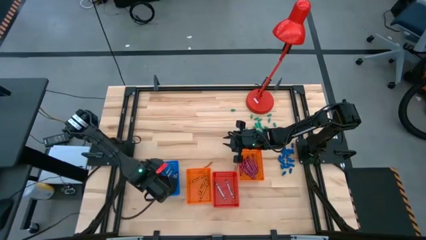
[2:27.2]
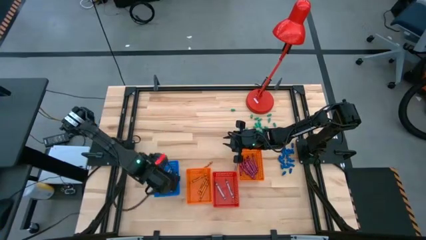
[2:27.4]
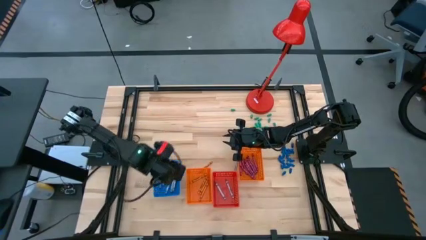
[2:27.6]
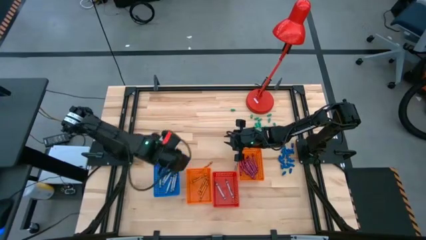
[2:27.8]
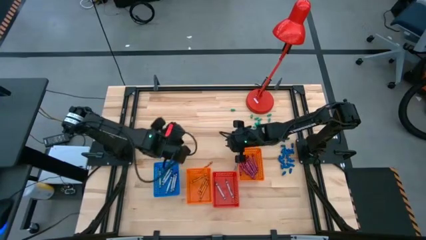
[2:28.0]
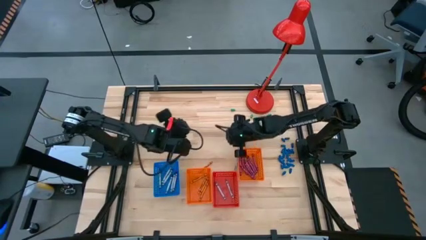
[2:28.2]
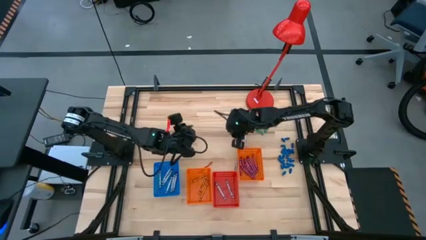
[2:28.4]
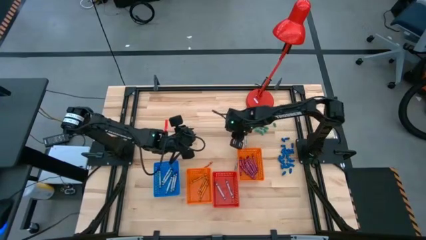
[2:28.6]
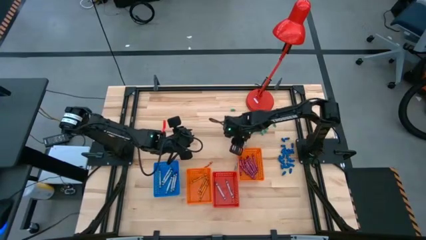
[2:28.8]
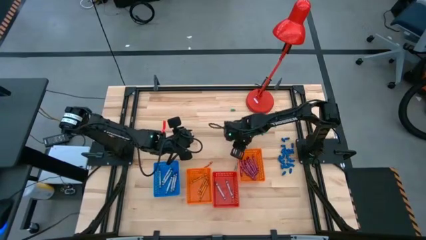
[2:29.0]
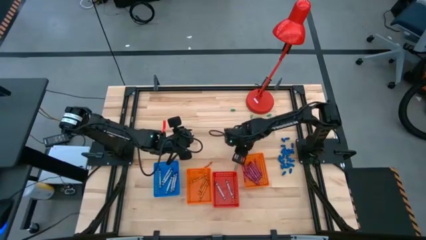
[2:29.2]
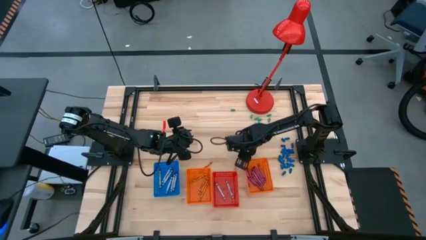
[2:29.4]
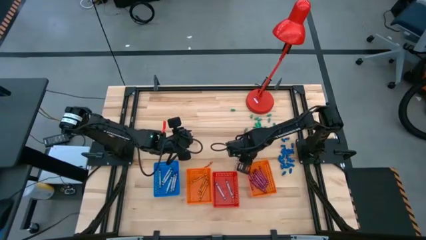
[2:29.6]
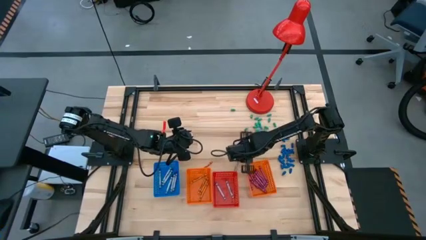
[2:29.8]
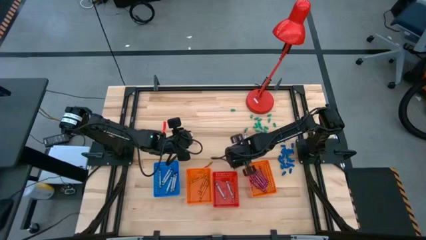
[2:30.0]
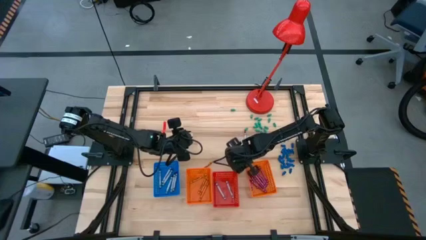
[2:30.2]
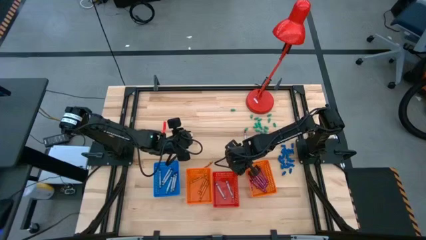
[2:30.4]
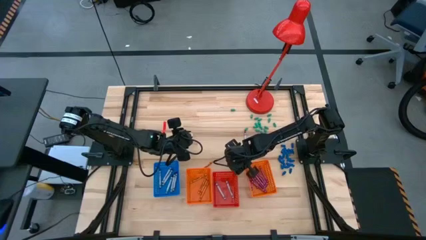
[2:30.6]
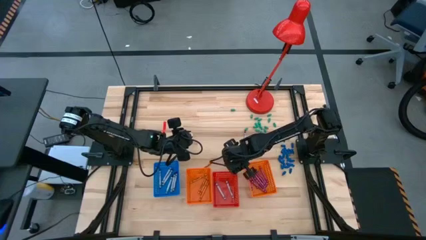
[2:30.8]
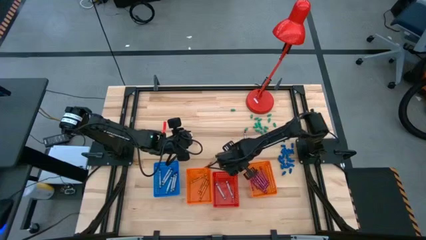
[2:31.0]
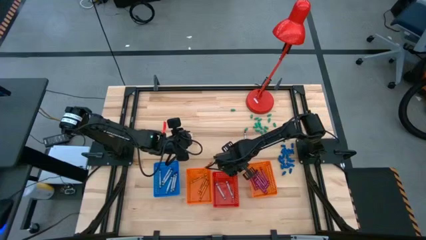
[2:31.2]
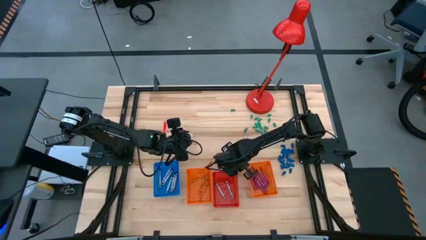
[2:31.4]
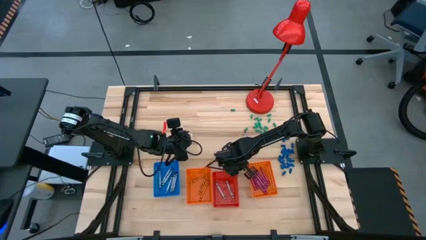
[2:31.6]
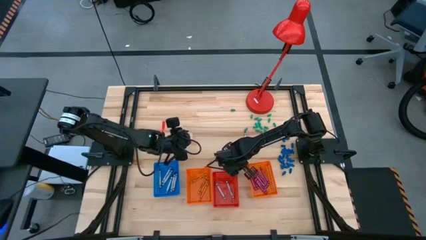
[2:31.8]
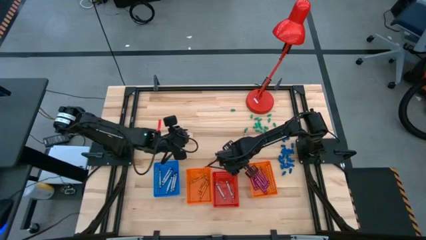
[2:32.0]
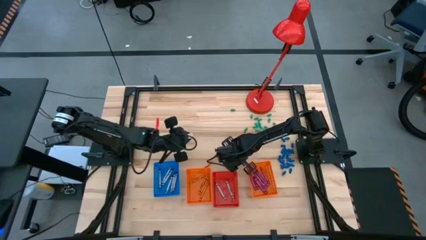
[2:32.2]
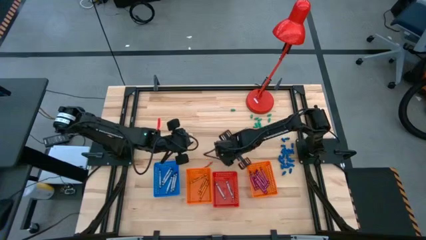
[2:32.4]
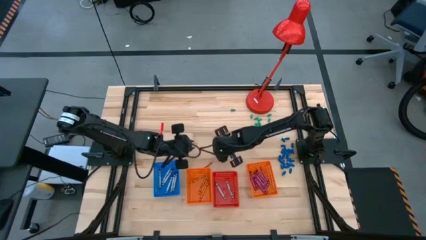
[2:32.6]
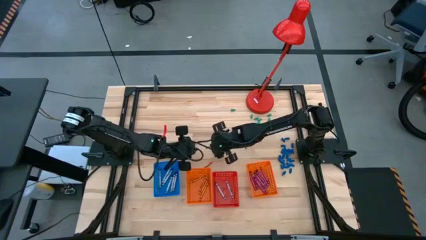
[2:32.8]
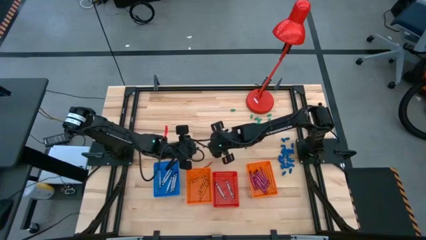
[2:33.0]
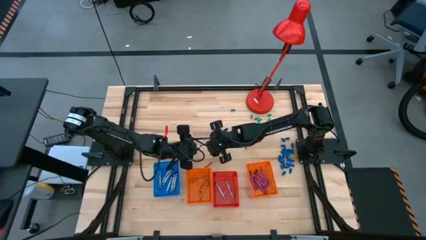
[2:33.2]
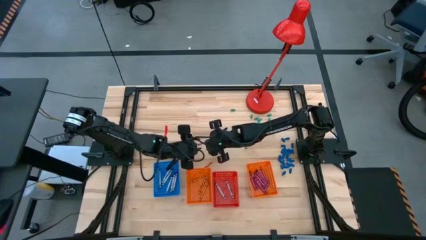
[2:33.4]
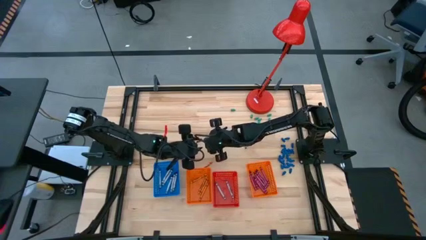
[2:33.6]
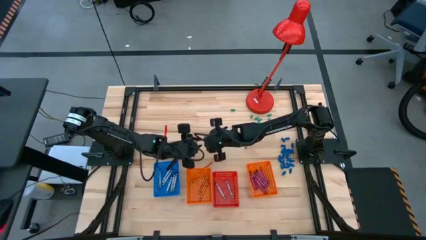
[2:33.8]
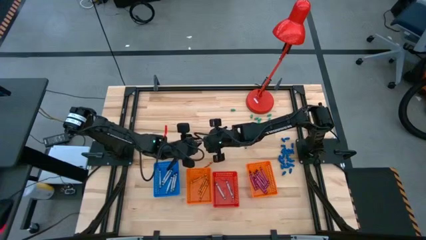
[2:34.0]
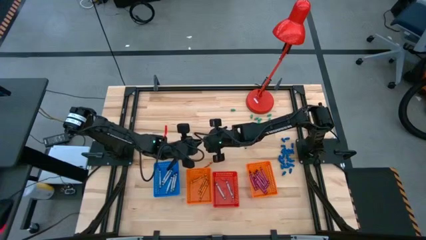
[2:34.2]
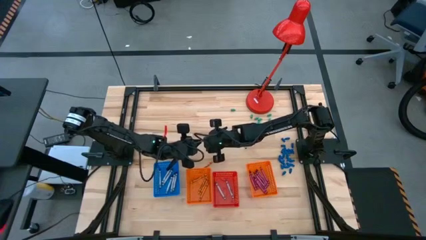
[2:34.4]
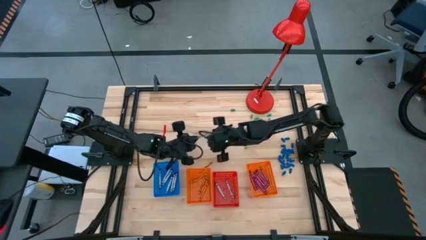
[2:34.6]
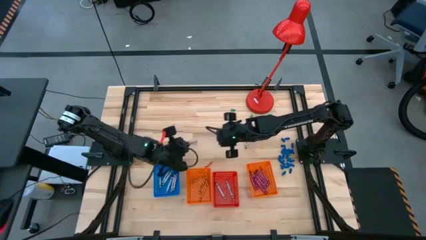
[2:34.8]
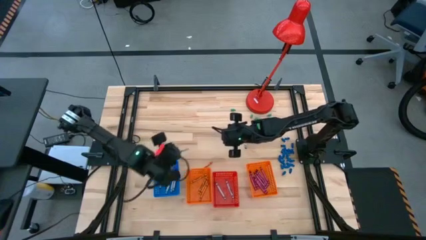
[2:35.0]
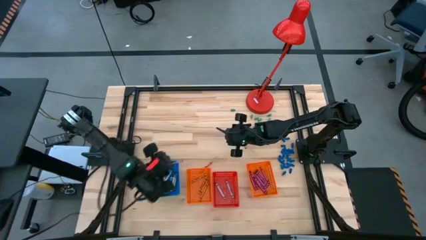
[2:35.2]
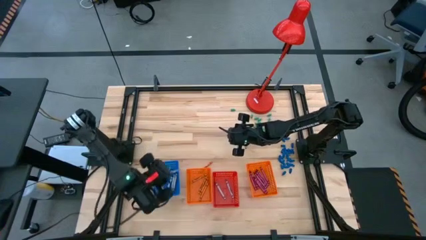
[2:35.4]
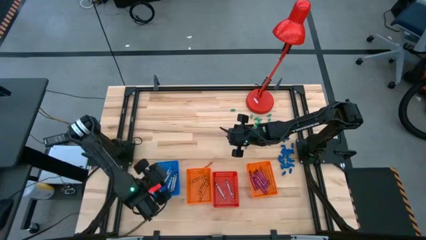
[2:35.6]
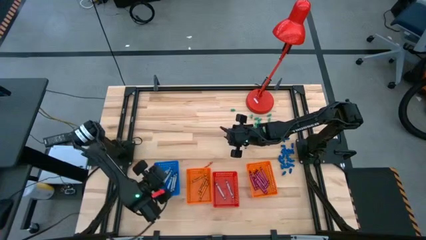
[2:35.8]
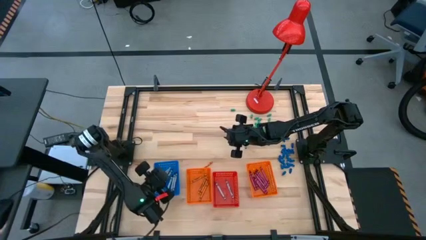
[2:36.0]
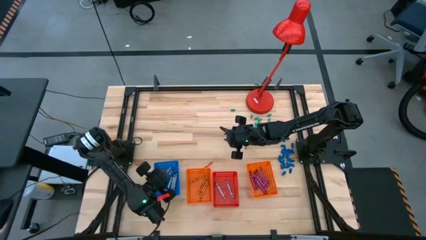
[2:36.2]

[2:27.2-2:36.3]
Task: Sort crayons
Put the black crayon into the blue bin

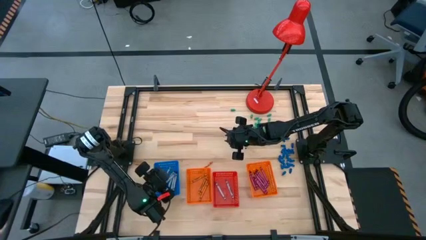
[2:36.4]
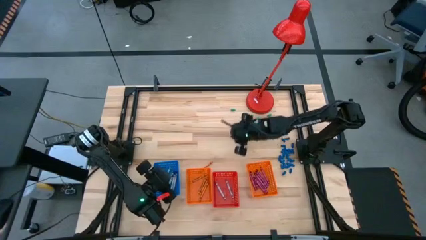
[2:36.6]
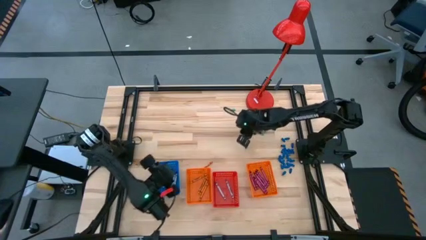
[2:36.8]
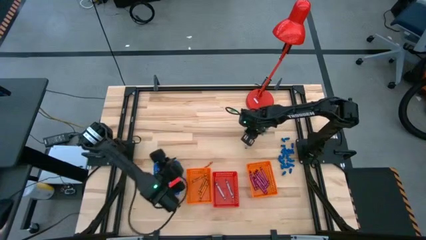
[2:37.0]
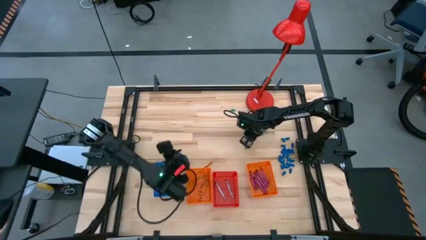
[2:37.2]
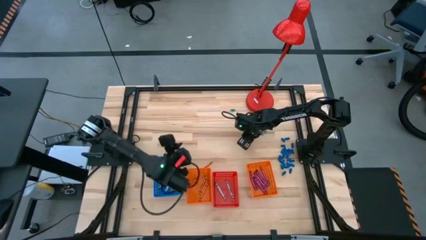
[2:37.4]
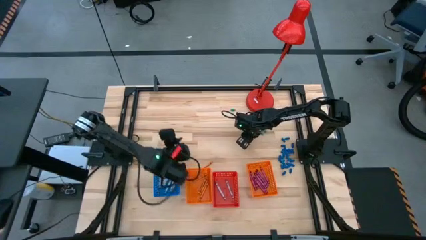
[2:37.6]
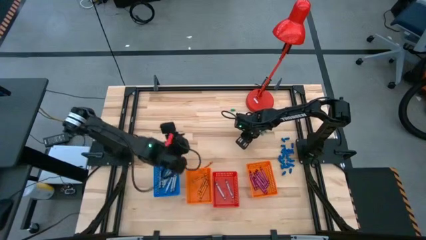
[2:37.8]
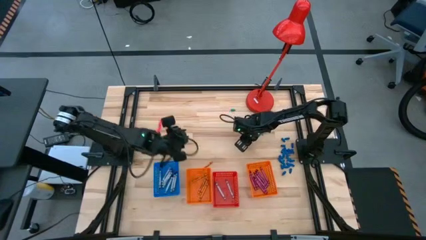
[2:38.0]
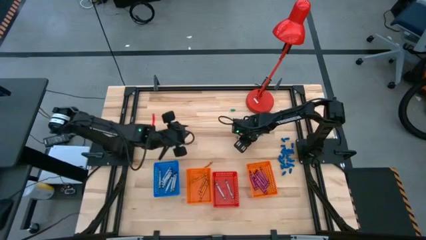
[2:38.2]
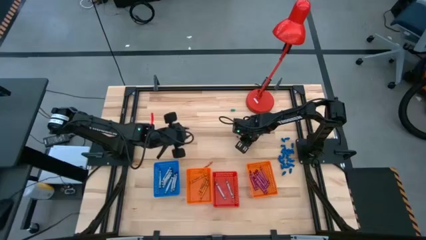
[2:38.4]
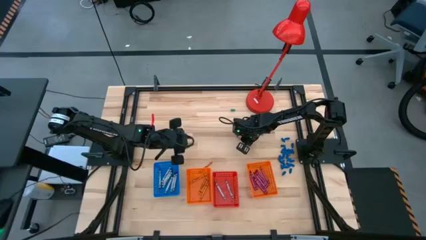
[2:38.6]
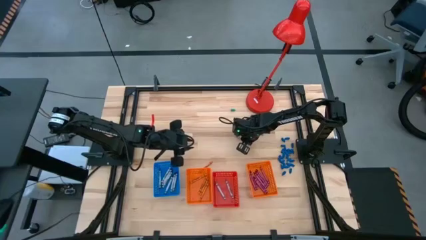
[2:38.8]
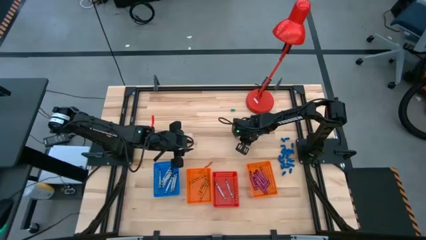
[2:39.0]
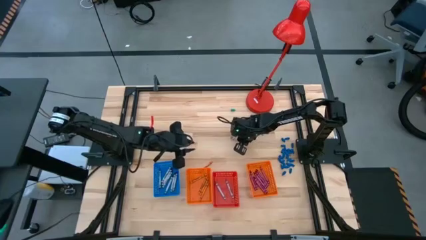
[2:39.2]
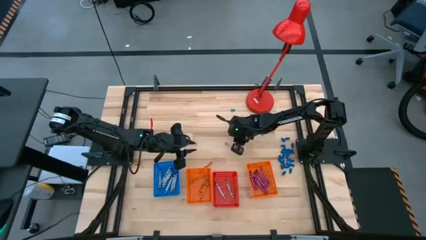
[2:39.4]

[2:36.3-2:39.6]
Put the black crayon into the blue bin
